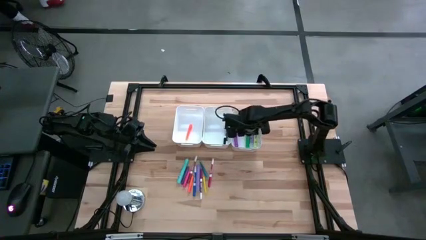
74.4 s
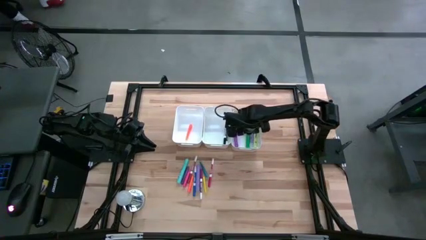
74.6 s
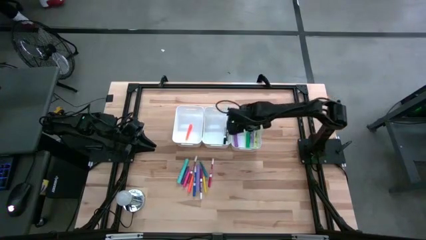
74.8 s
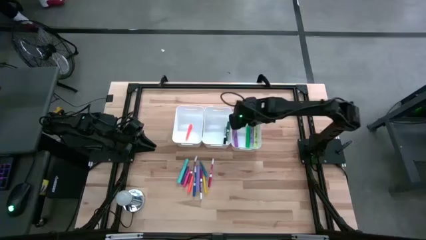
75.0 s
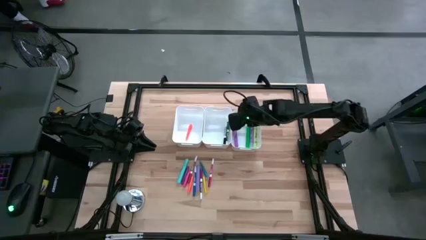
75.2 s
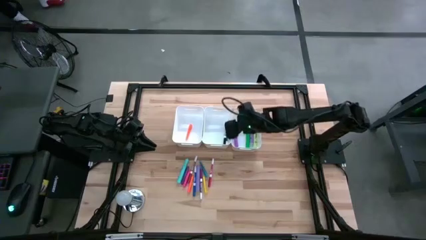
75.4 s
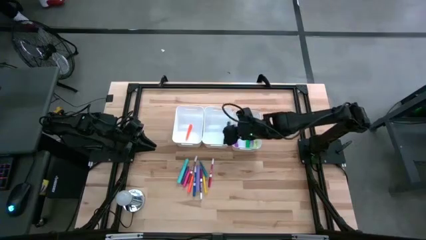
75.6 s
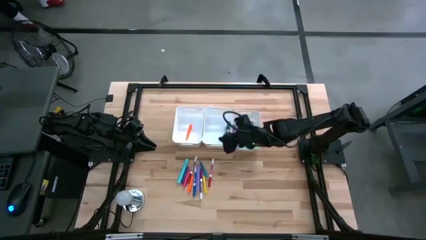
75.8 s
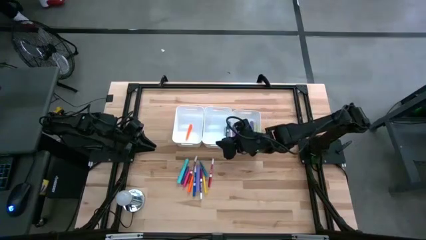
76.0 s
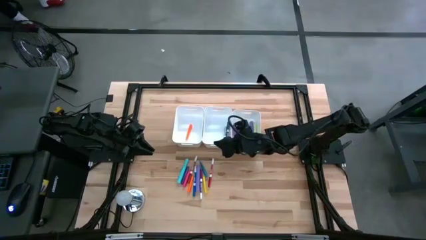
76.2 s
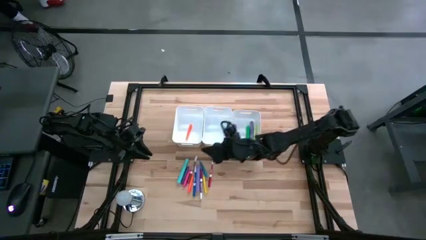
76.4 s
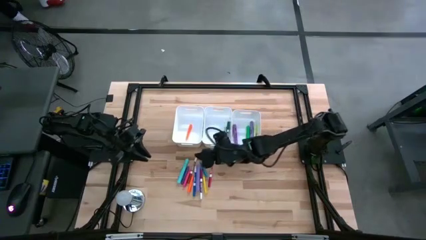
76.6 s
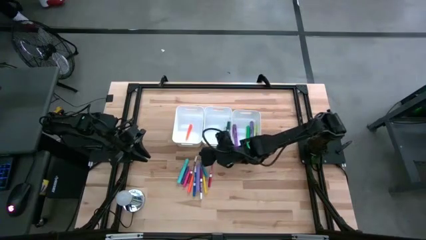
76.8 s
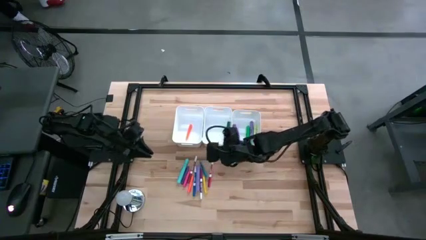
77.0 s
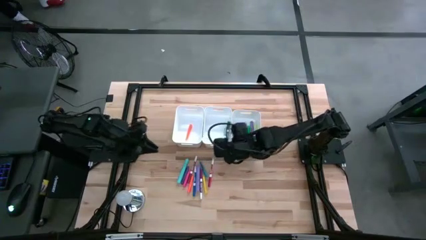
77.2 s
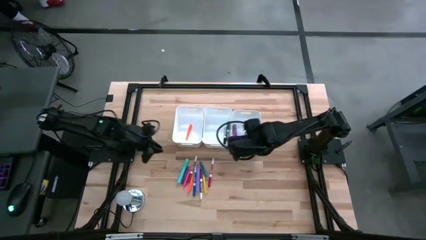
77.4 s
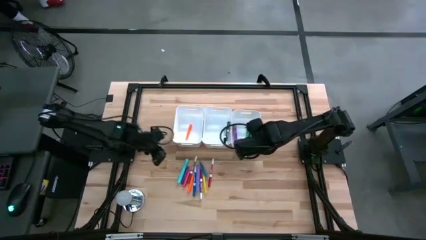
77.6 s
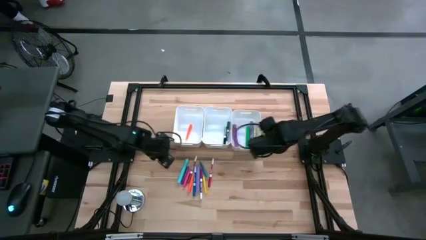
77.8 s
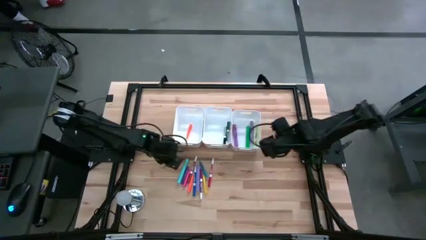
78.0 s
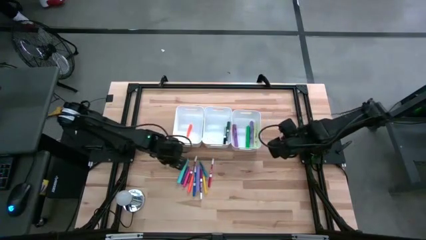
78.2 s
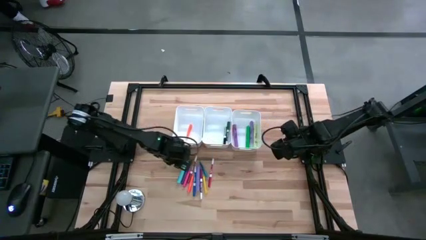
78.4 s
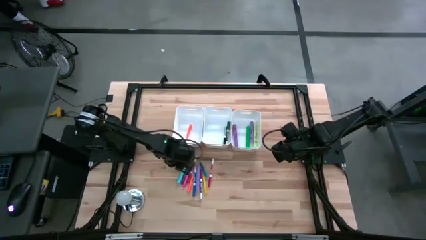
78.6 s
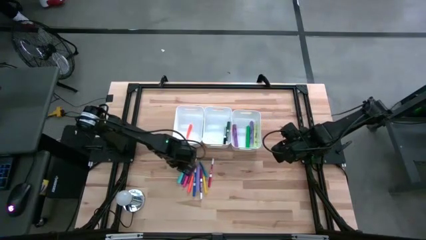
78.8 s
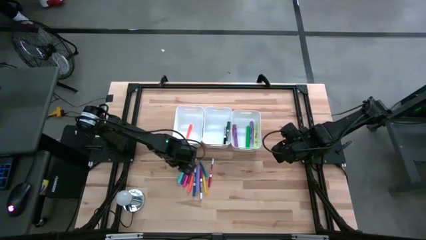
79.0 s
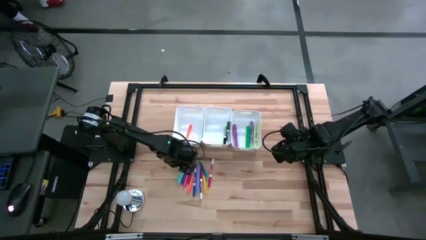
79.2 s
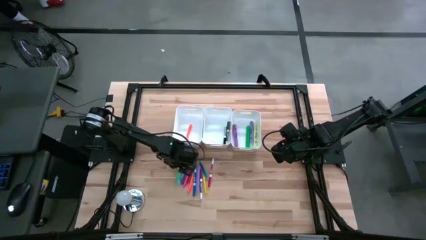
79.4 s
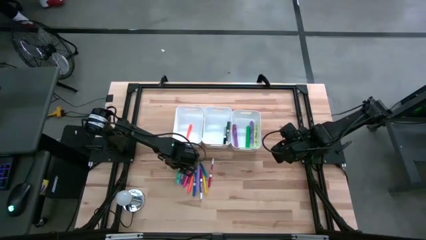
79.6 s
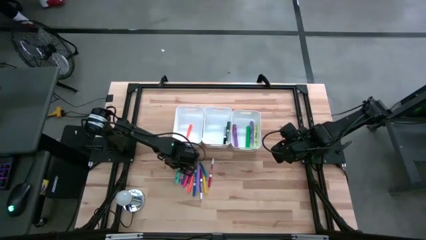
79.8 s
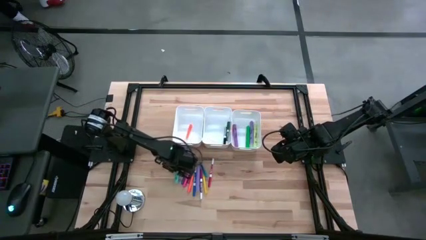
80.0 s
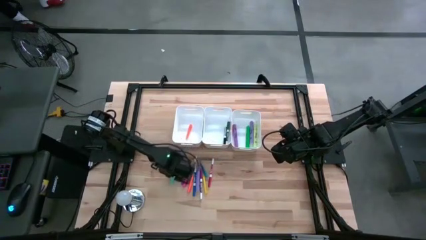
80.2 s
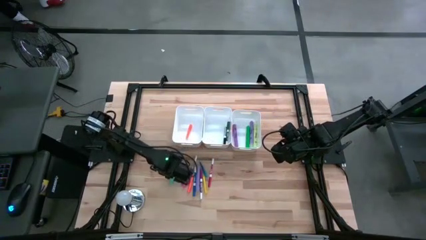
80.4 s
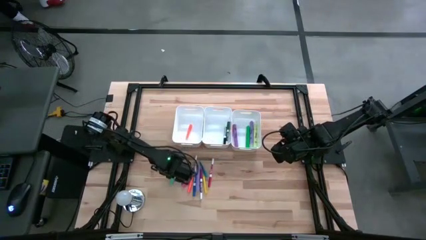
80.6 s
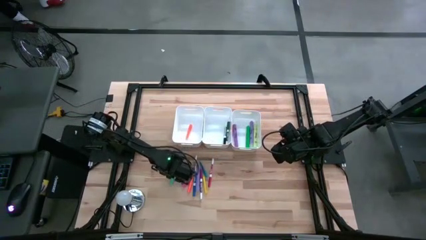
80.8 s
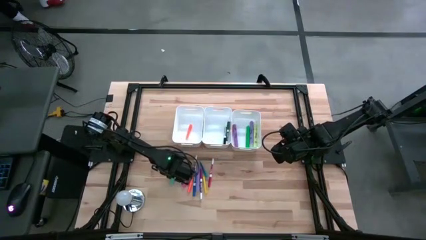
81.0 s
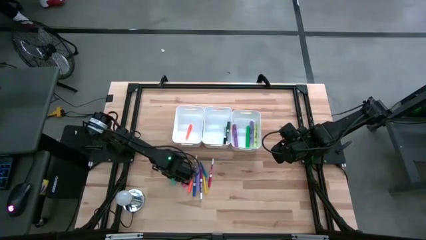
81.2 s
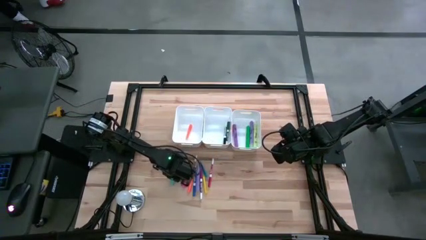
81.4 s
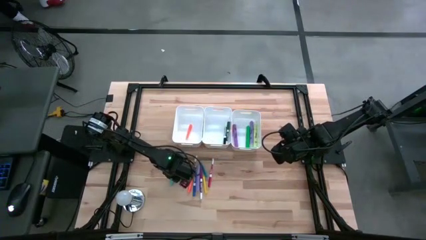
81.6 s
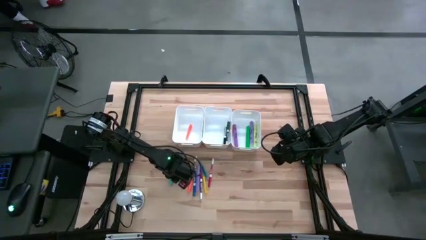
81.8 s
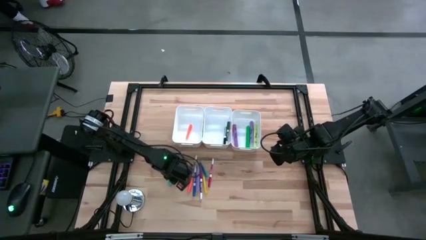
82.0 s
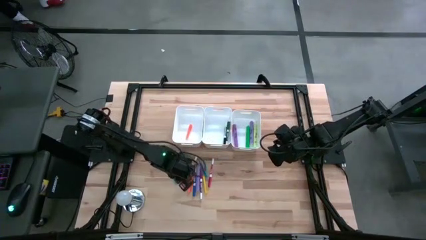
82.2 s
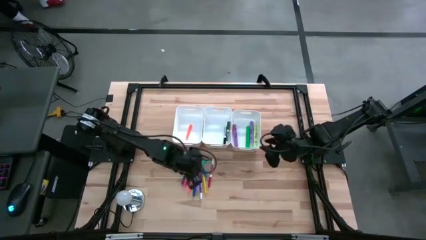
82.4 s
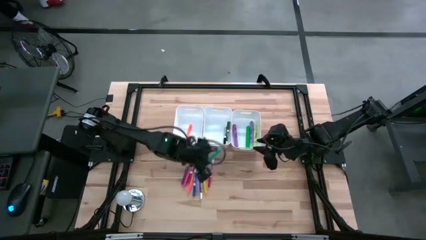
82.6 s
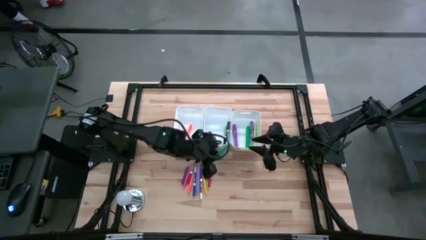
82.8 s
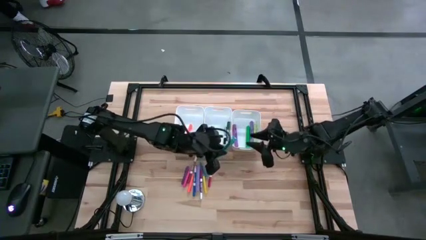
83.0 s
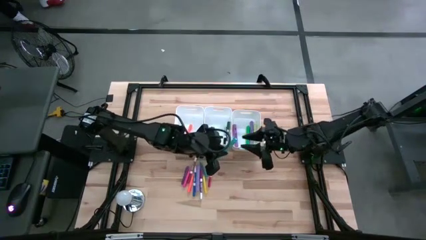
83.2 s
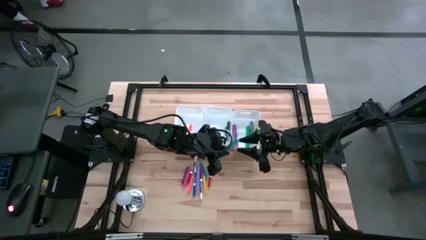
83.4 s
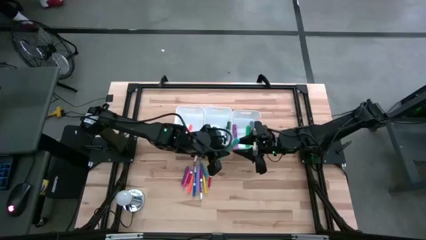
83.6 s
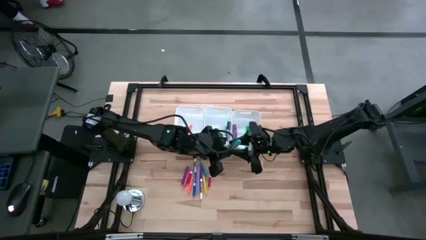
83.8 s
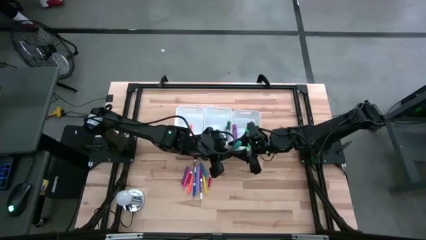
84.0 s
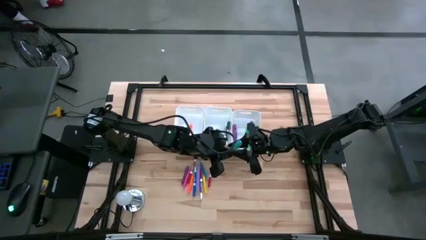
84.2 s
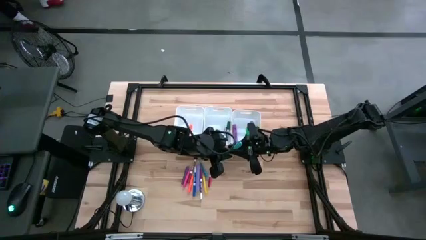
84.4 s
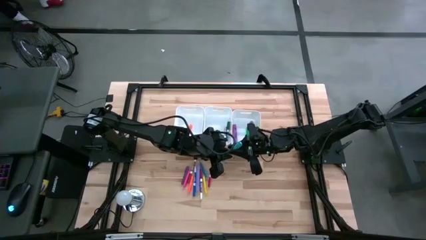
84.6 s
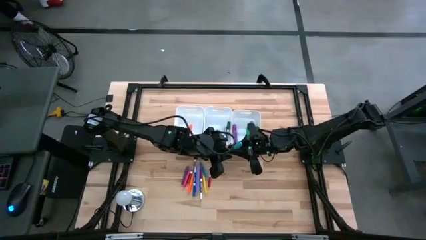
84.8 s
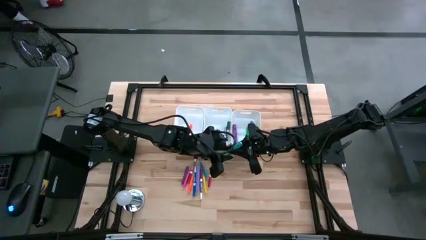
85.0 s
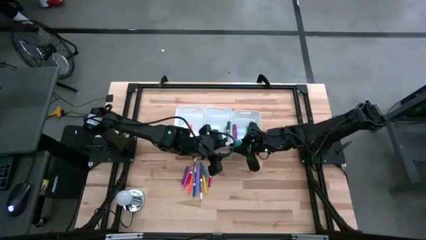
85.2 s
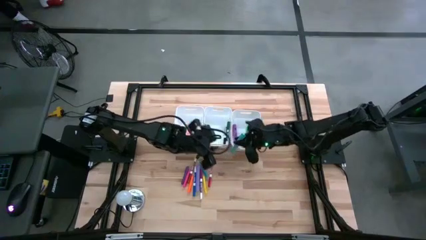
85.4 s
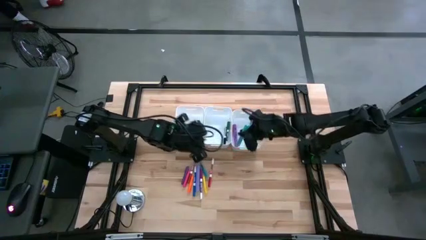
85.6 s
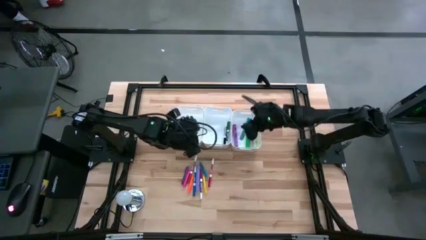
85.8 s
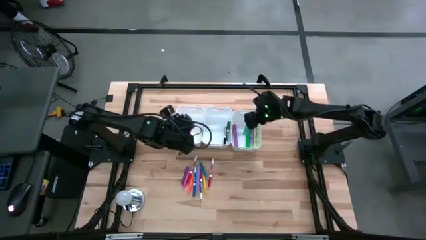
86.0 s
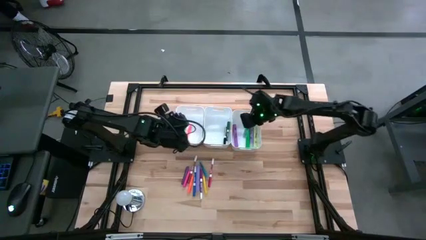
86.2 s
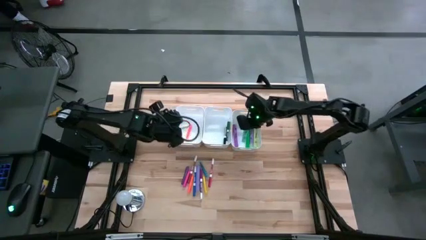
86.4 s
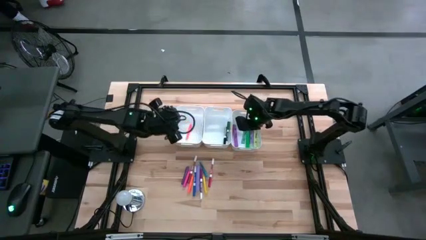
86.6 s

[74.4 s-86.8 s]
Task: Pick & Place Markers
Put the sky blue highlighter into the right white bin

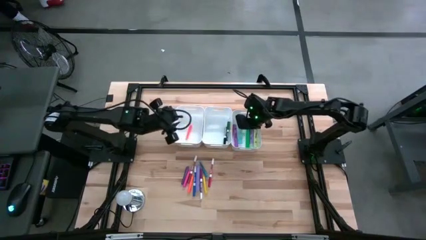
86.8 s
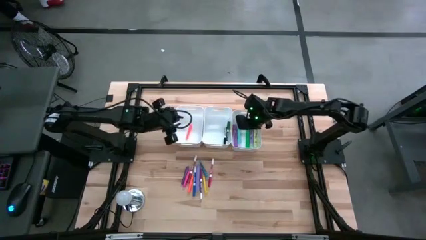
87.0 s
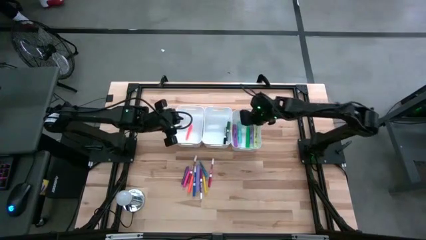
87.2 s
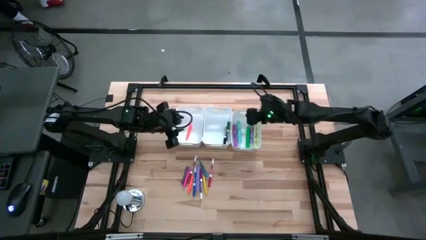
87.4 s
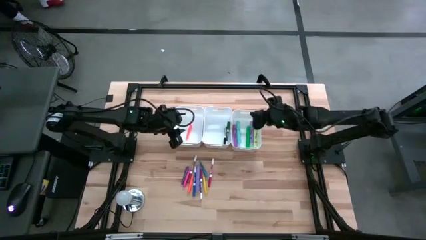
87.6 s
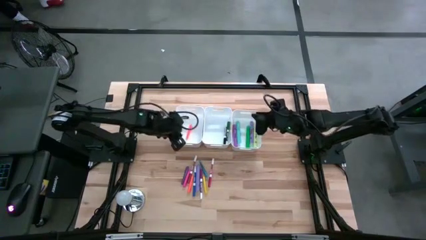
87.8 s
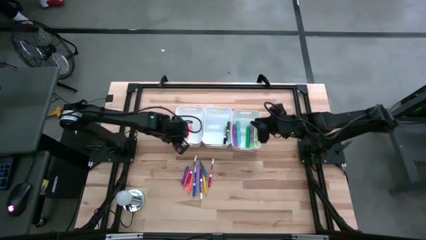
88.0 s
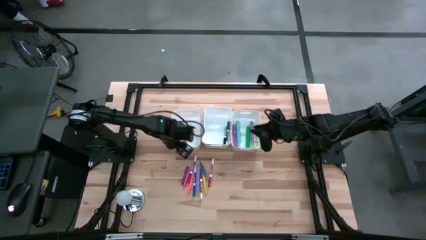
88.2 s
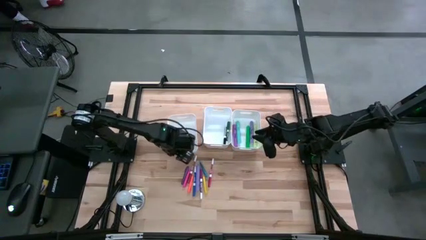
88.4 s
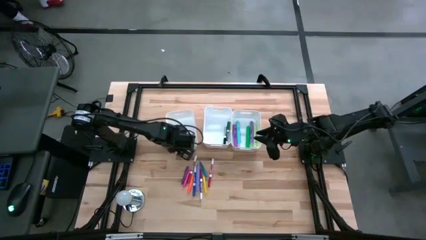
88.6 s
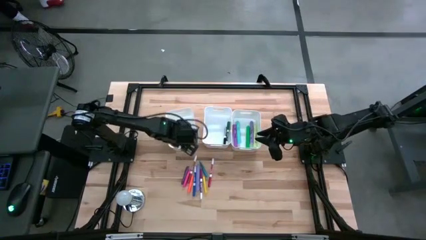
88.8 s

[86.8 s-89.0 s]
Adjust the left white bin on the table

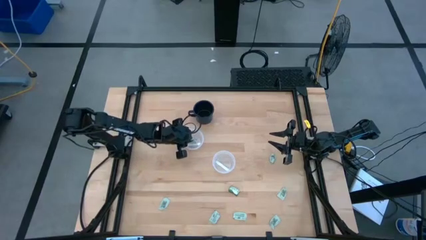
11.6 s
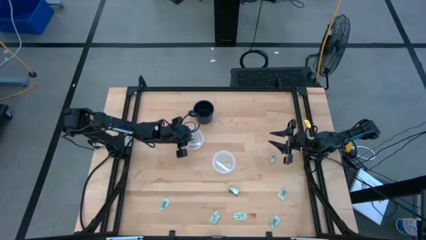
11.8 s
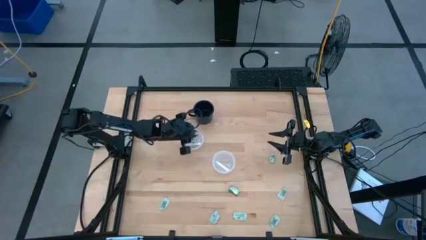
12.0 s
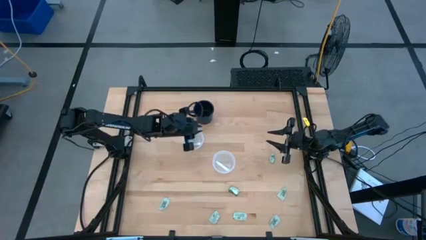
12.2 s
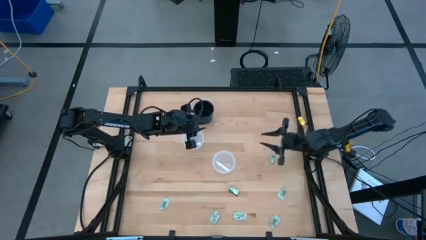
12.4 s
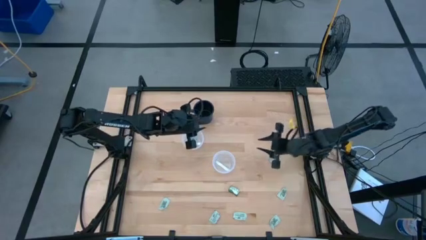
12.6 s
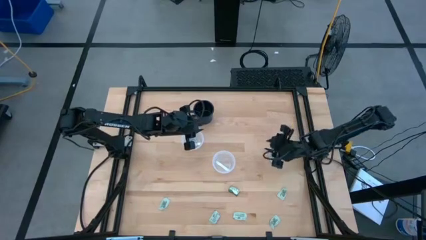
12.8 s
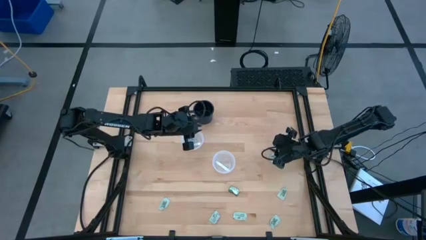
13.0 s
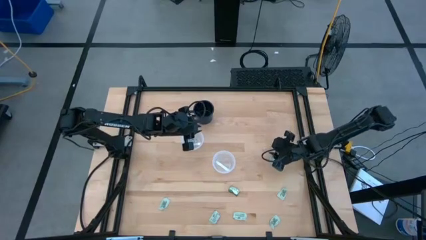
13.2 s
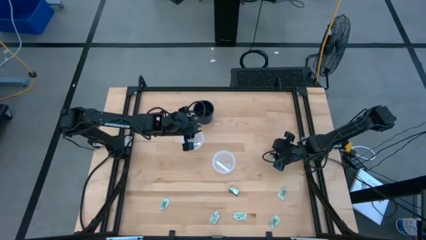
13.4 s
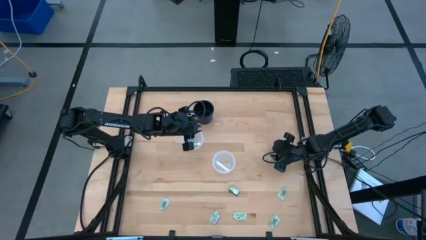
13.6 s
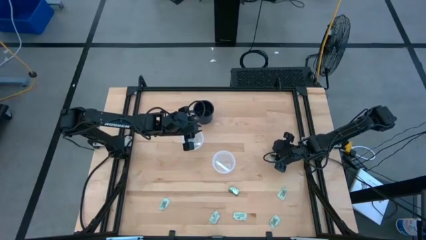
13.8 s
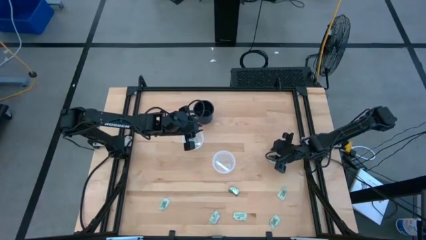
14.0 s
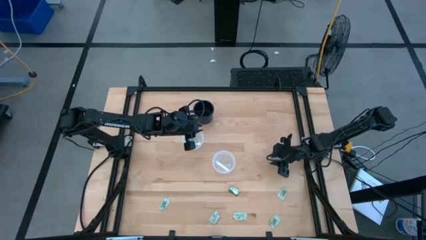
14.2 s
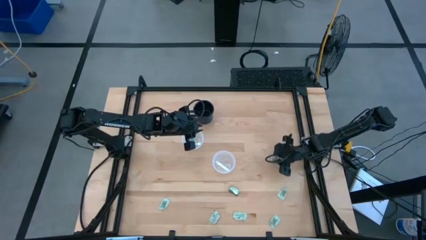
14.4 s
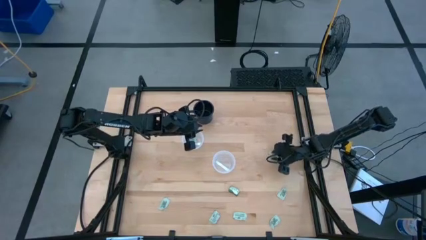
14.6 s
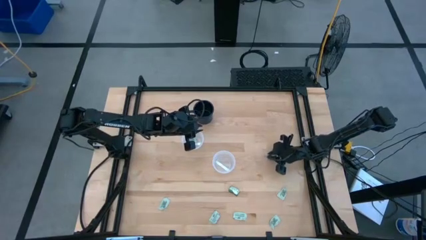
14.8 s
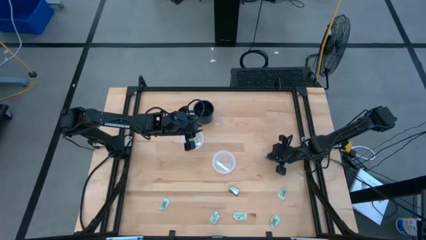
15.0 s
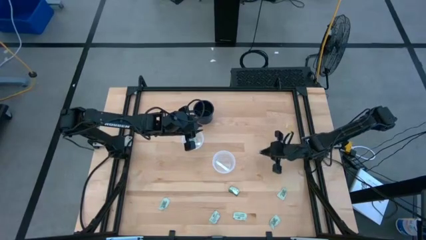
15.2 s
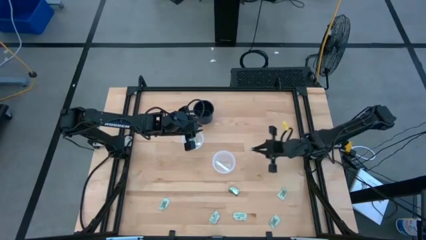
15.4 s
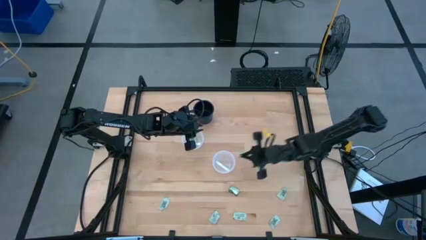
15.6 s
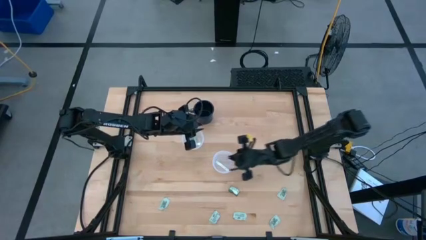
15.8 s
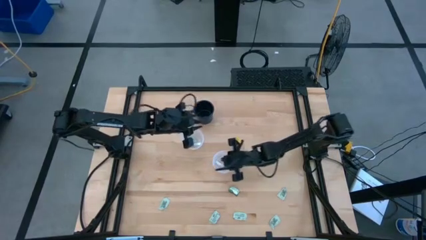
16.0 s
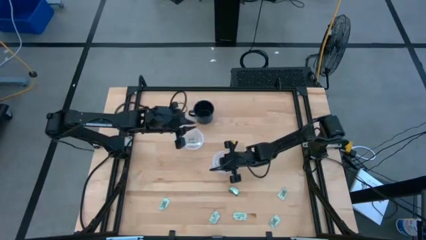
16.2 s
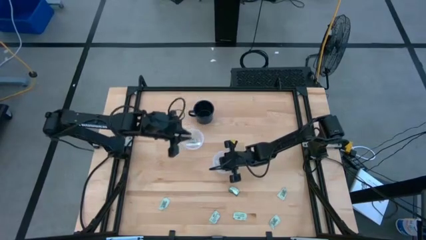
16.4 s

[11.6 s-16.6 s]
Task: Pick and place Stevia / Truvia into bins
Put the stevia packet into the bottom round transparent container
